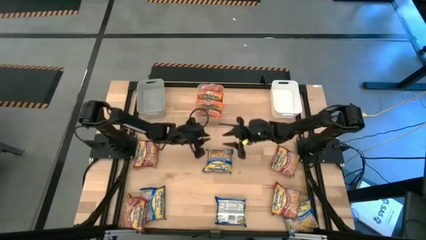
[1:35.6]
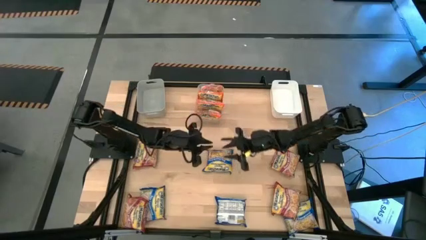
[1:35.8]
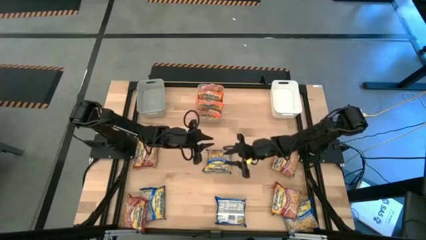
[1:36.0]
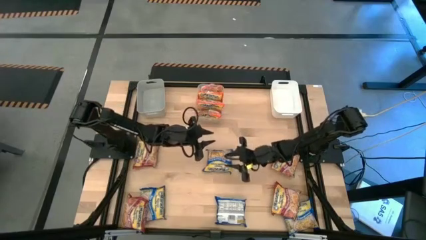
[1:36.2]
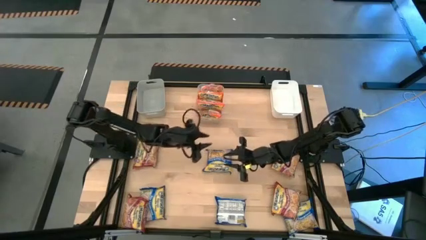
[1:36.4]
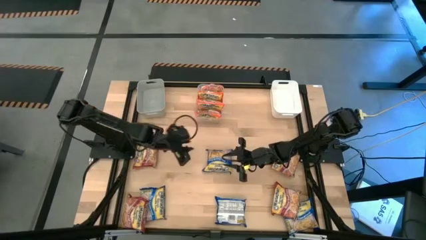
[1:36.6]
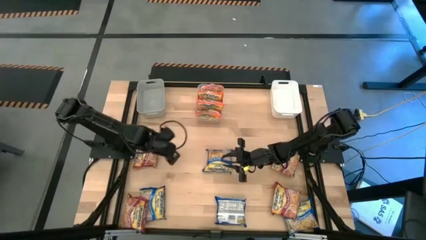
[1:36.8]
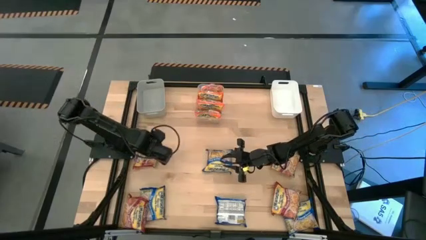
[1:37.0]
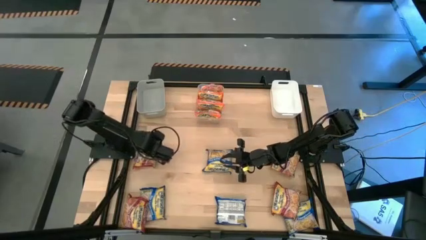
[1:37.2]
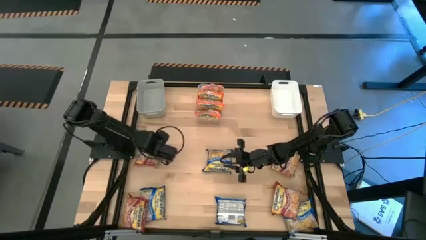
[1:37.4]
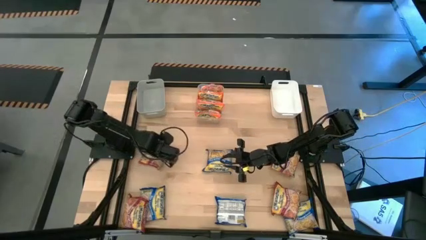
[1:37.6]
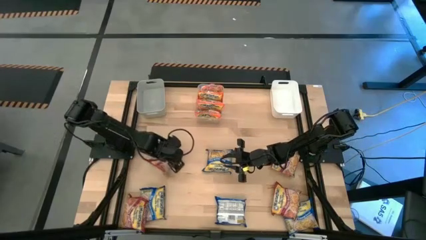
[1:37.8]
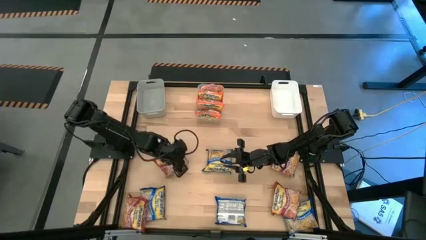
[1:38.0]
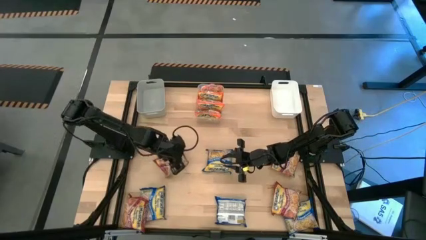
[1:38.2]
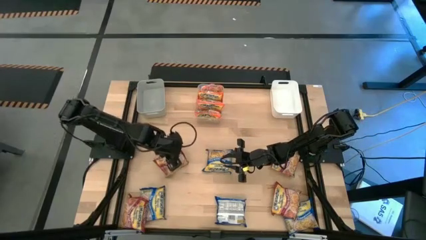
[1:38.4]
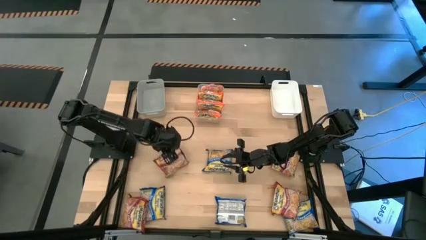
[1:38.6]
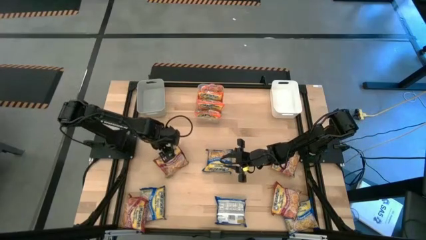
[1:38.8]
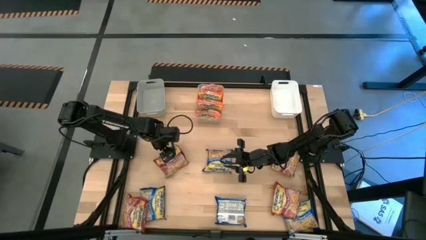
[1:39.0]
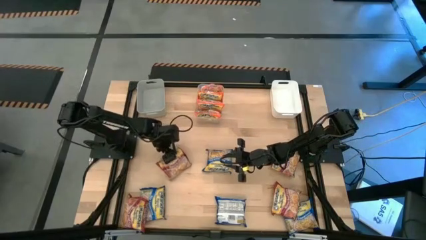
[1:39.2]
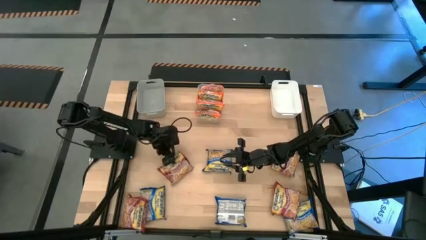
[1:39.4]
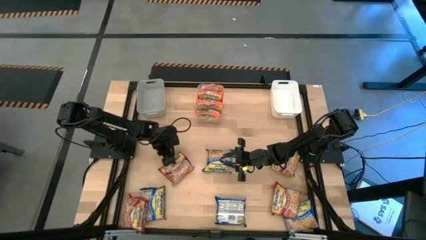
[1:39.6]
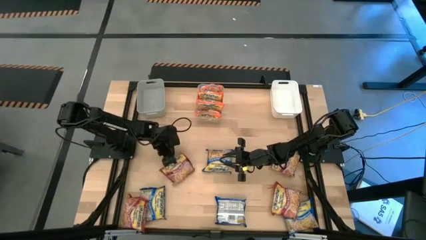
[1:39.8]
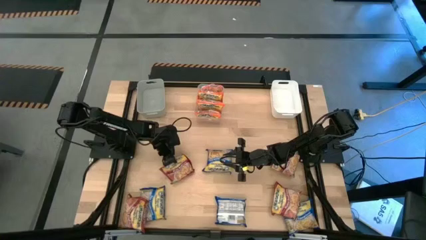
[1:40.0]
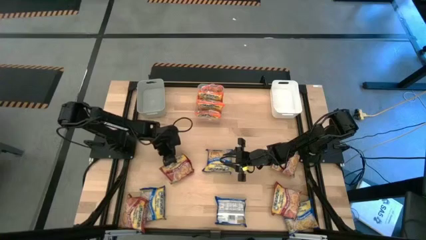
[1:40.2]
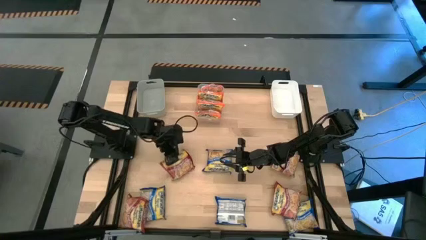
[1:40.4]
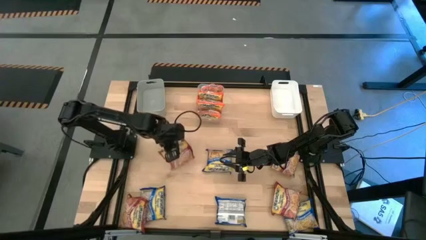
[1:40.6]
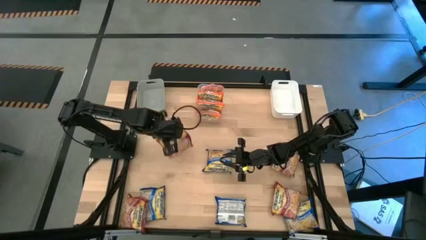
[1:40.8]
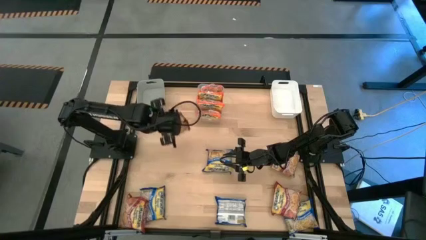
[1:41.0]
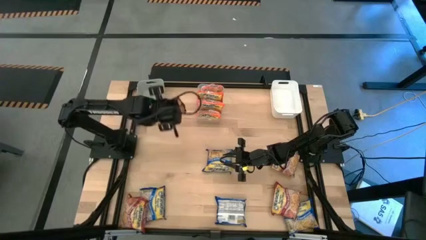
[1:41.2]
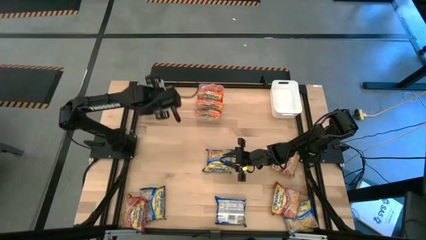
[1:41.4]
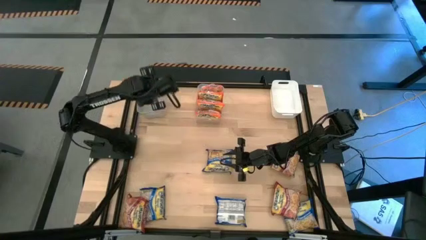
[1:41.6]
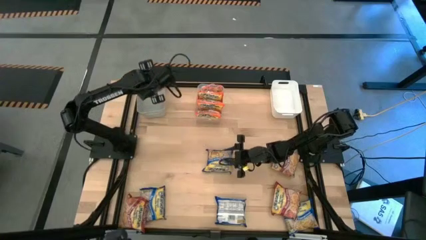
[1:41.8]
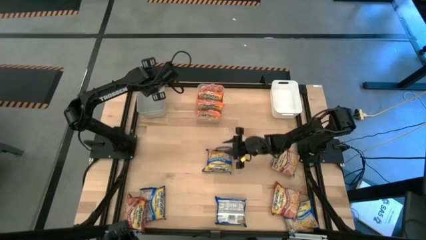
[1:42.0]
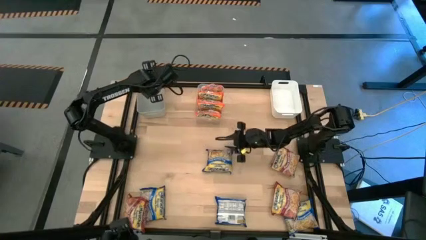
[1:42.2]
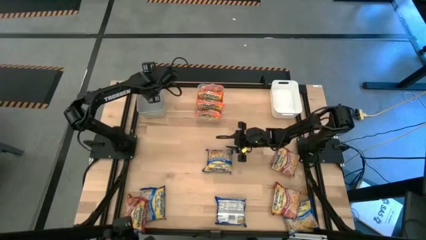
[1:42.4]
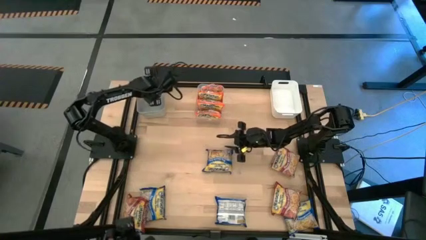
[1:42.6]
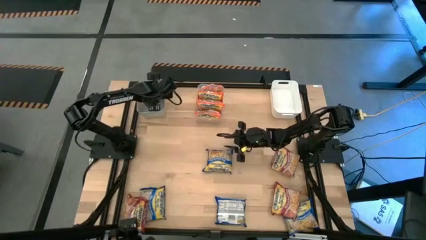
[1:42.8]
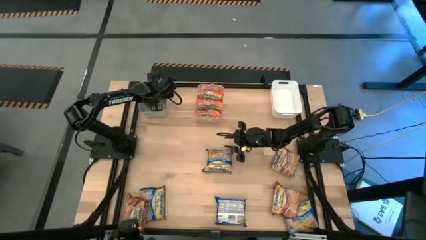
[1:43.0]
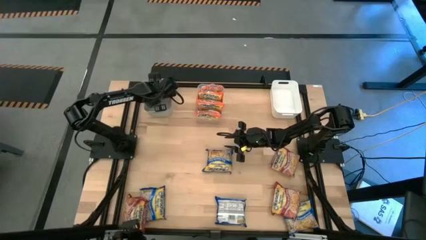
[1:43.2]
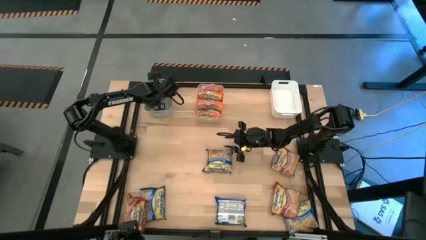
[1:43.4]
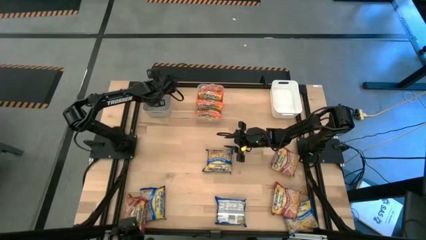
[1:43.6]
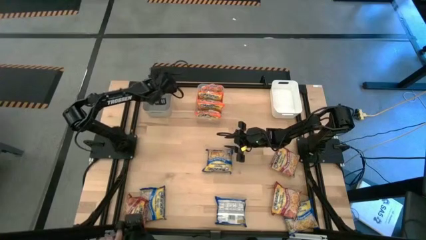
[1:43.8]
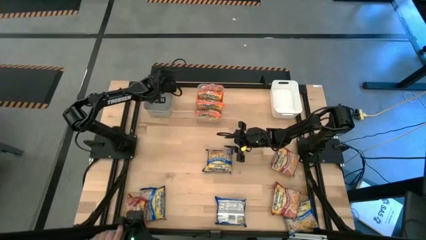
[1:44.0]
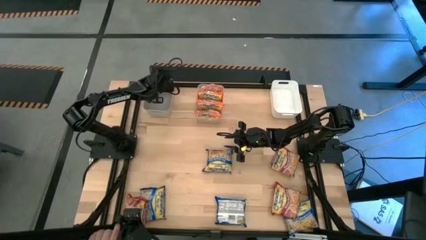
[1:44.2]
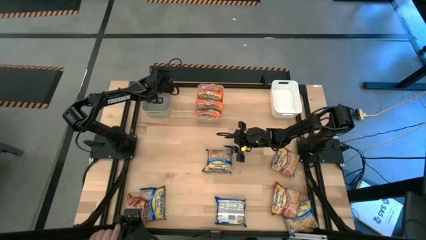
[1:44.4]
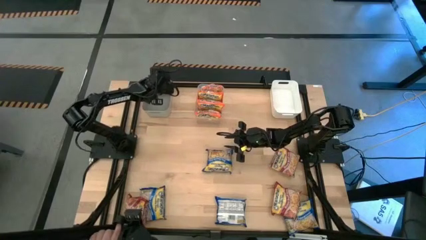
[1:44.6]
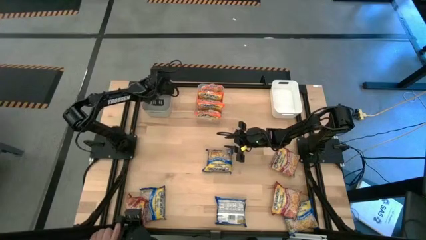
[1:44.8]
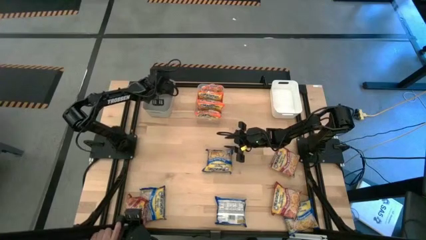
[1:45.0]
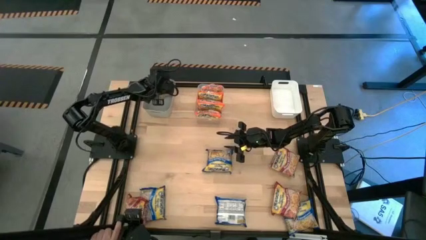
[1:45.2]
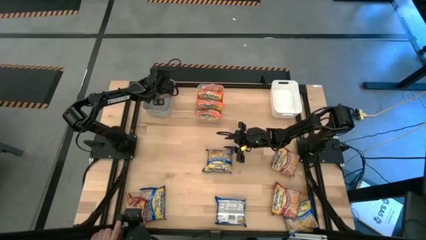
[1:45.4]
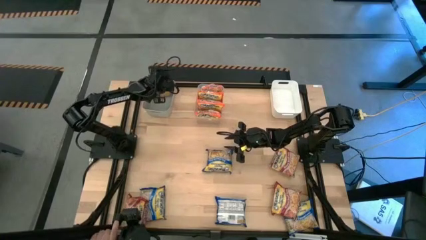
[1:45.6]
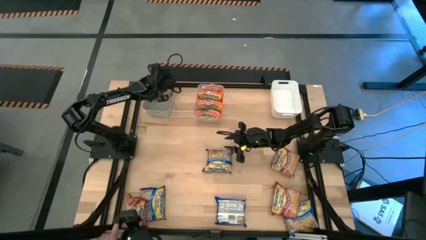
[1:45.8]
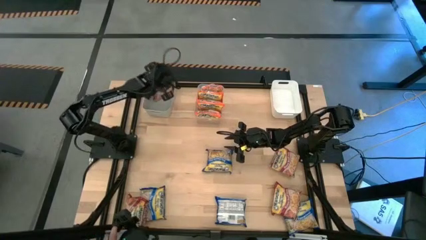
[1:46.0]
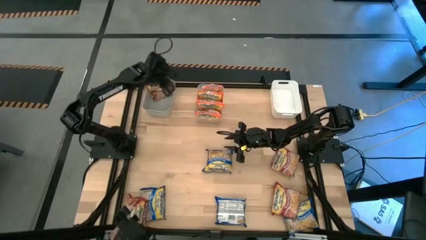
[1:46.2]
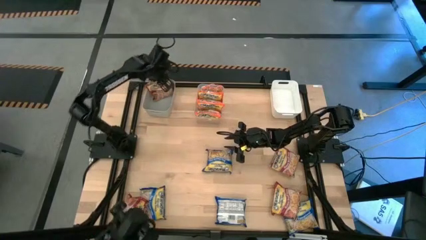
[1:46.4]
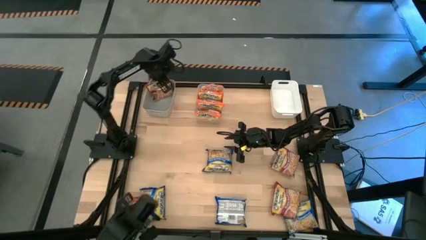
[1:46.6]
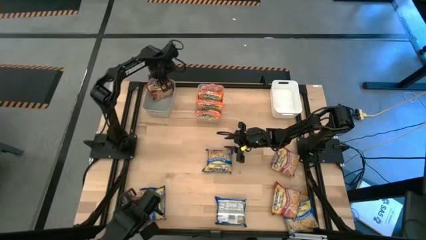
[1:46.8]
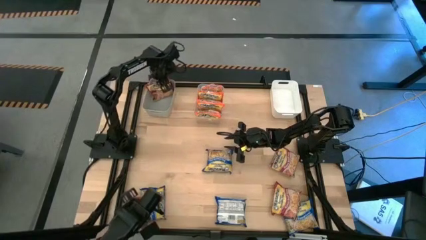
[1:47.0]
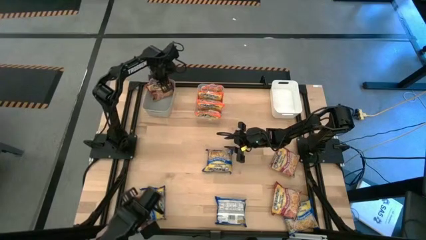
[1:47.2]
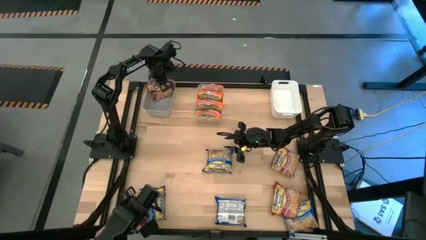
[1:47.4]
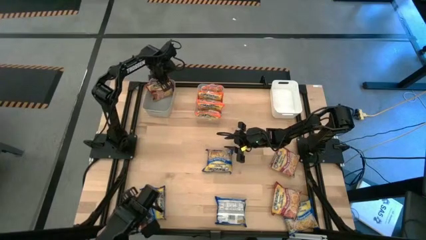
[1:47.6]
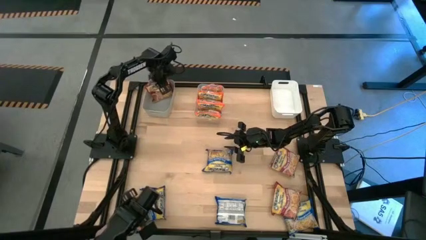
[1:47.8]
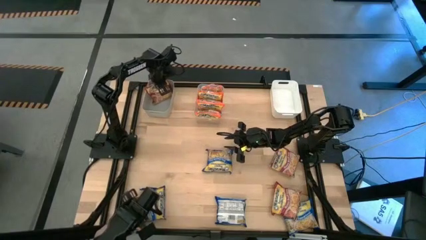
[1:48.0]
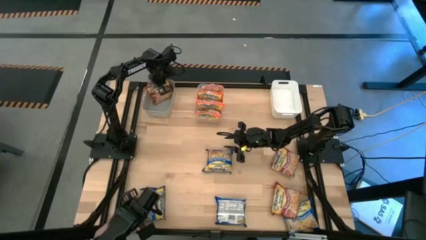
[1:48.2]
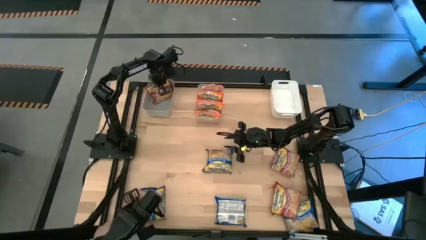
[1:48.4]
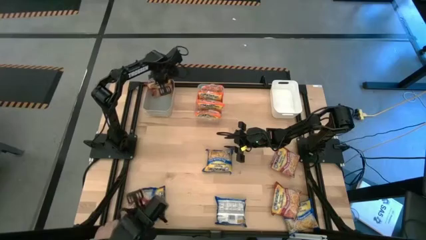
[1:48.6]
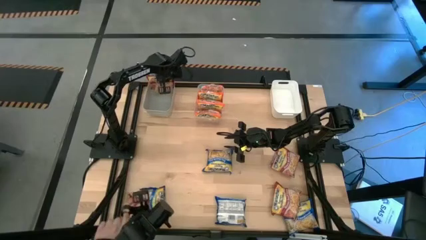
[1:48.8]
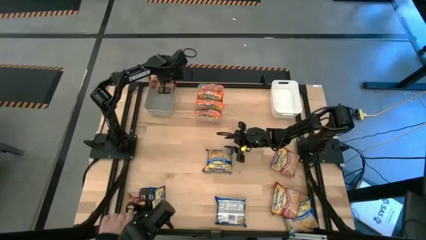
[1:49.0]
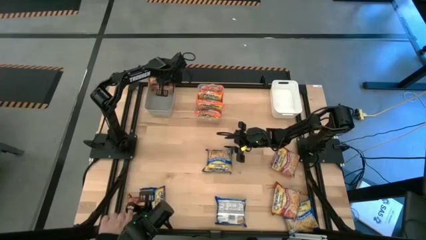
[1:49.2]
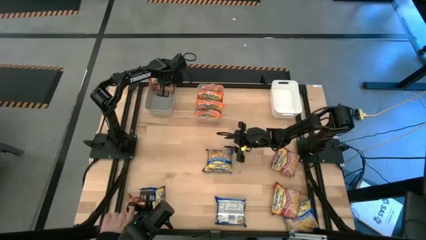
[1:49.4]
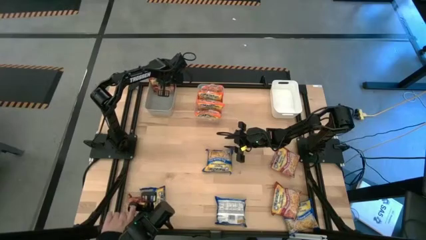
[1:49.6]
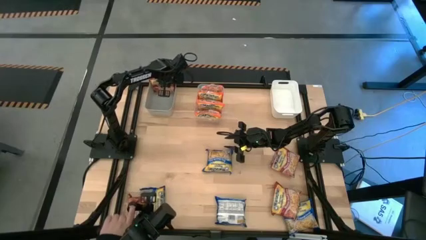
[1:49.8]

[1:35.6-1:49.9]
Task: Sort Maruchan noodles
Put the top left red noodle into the gray bin
